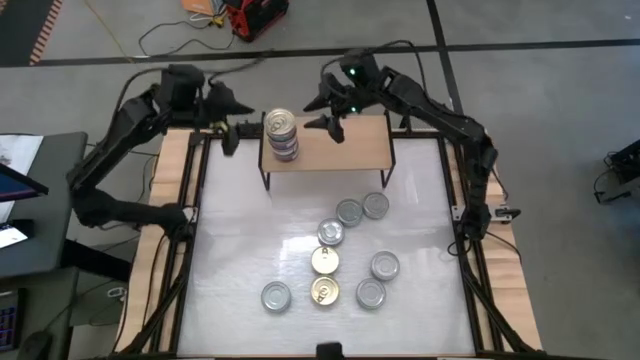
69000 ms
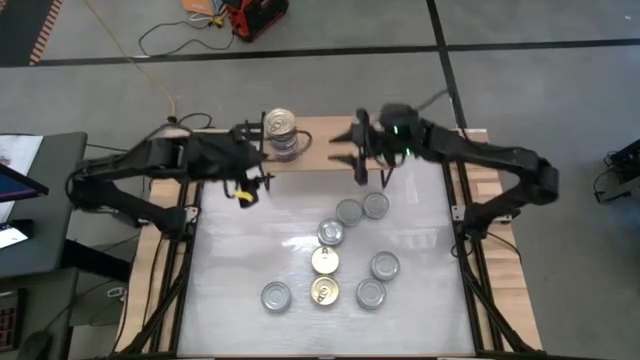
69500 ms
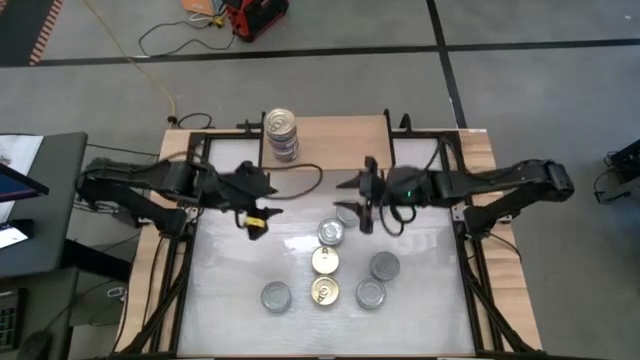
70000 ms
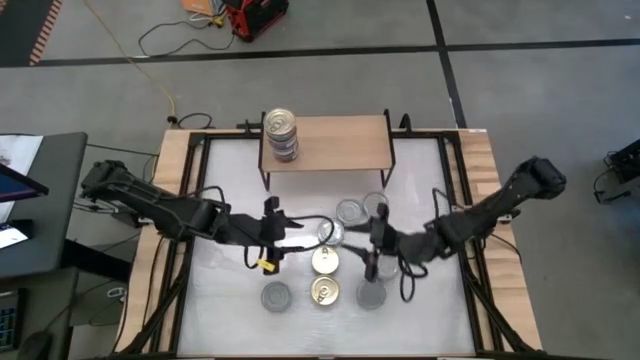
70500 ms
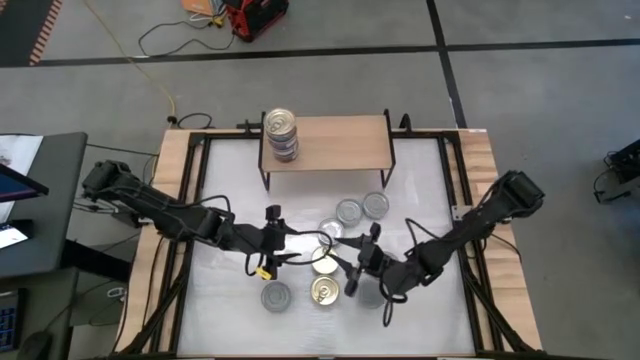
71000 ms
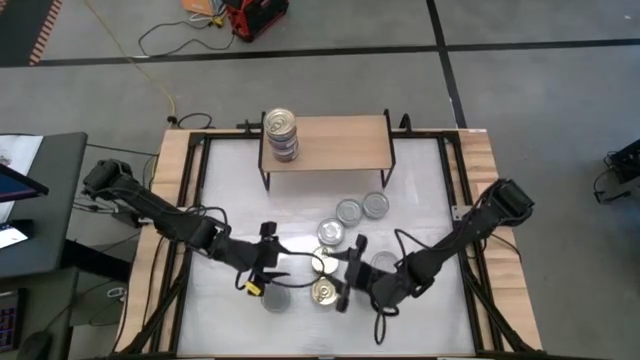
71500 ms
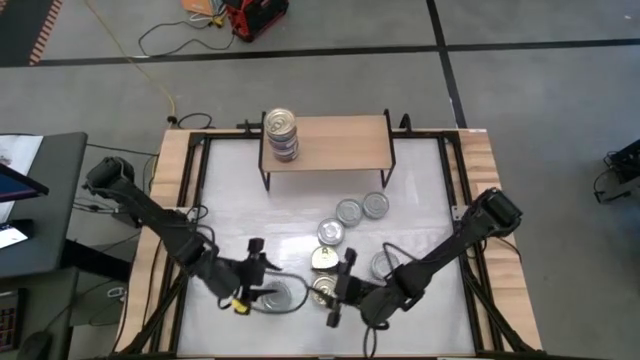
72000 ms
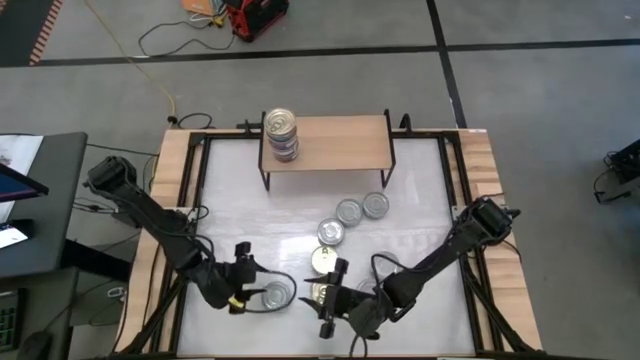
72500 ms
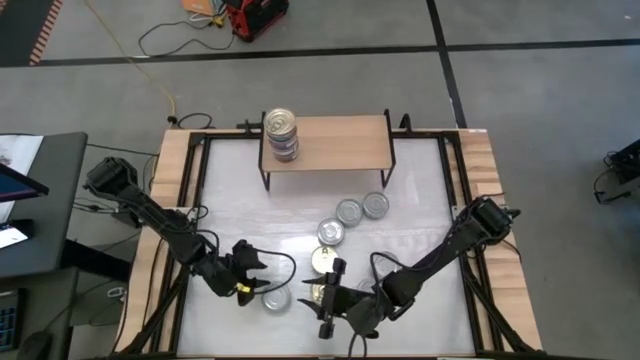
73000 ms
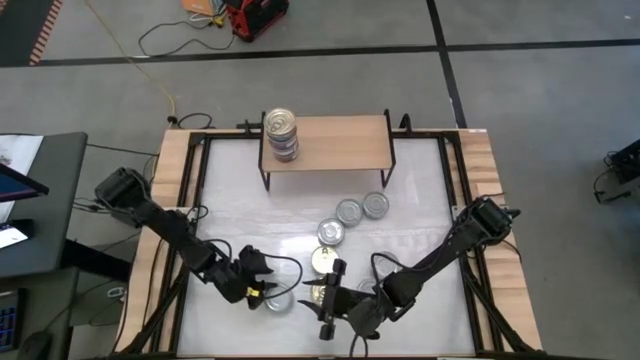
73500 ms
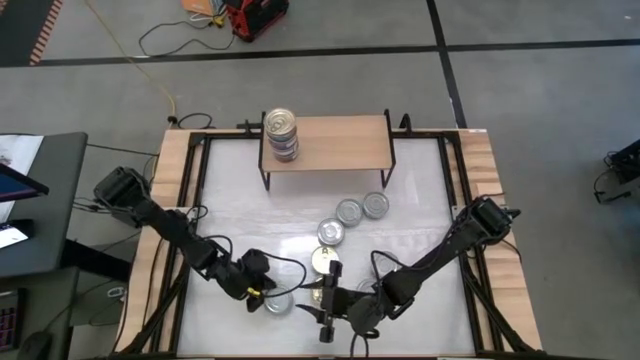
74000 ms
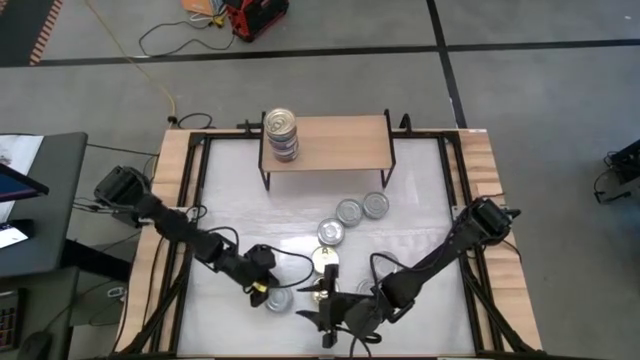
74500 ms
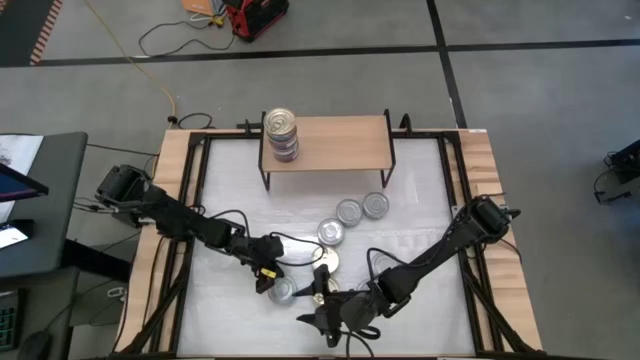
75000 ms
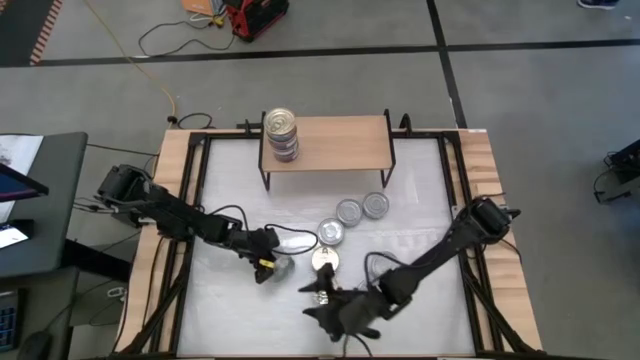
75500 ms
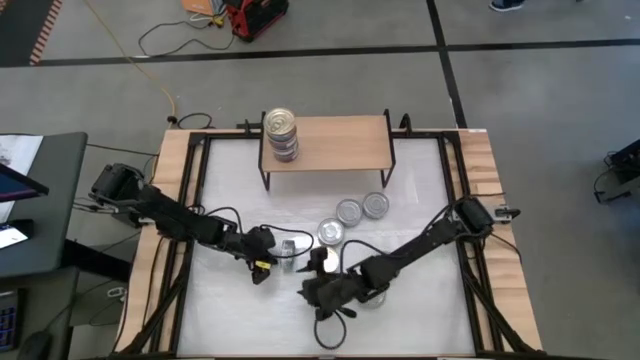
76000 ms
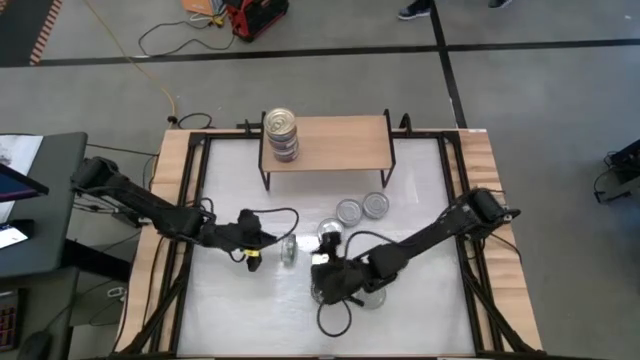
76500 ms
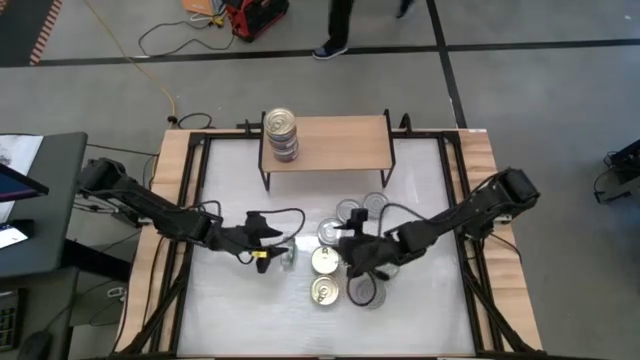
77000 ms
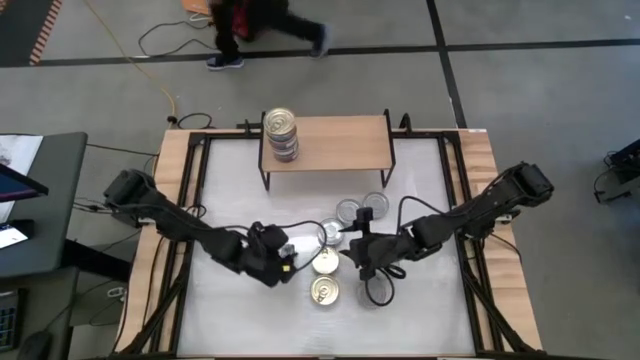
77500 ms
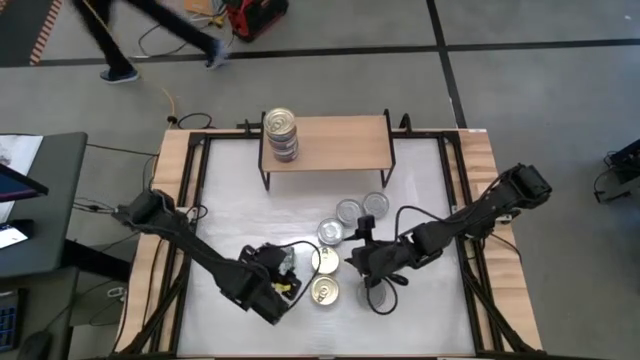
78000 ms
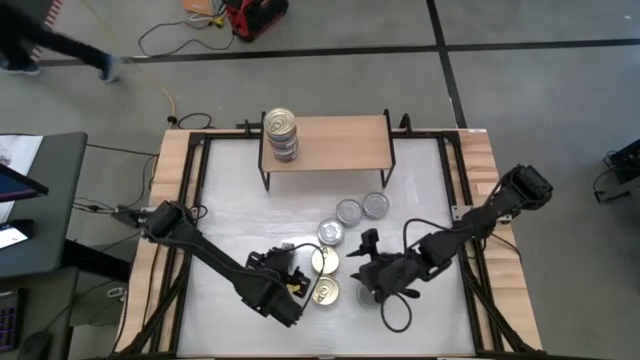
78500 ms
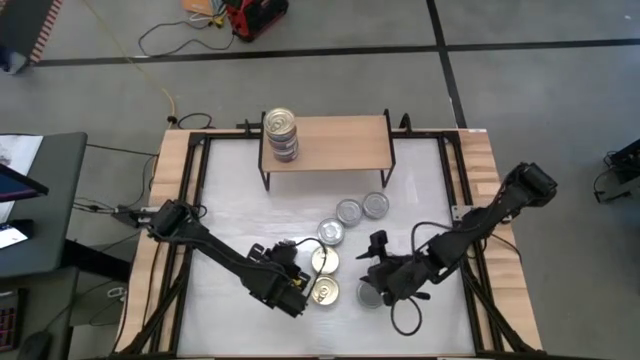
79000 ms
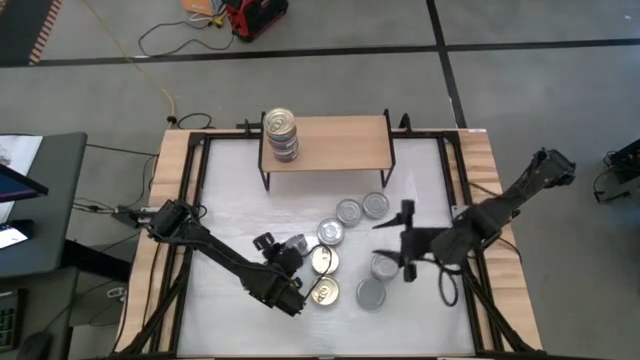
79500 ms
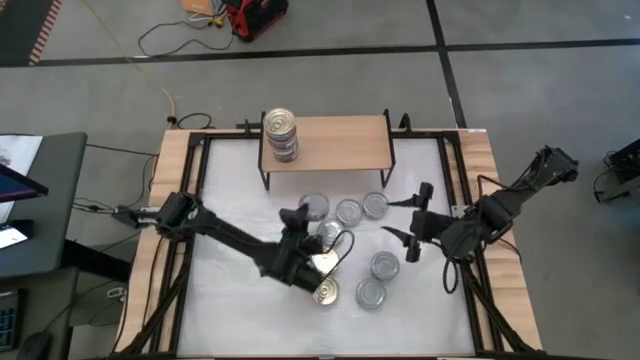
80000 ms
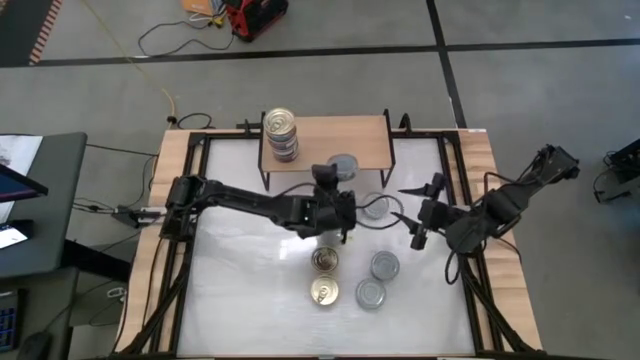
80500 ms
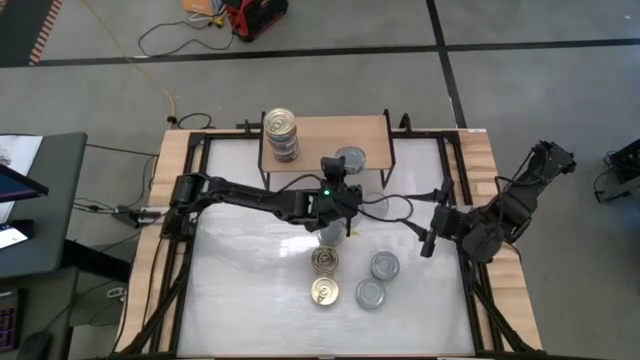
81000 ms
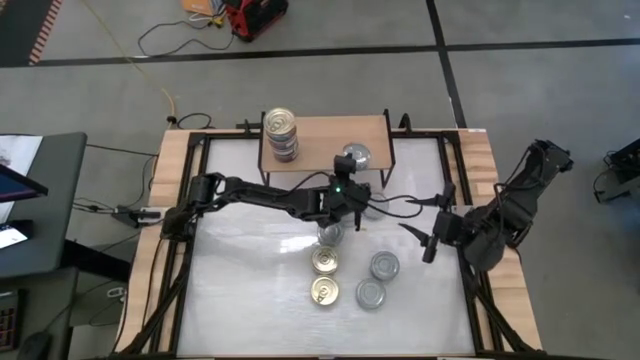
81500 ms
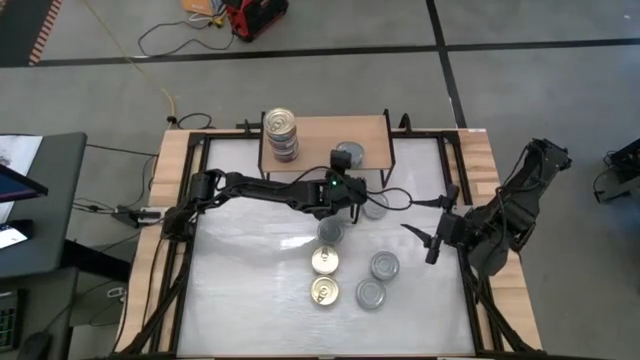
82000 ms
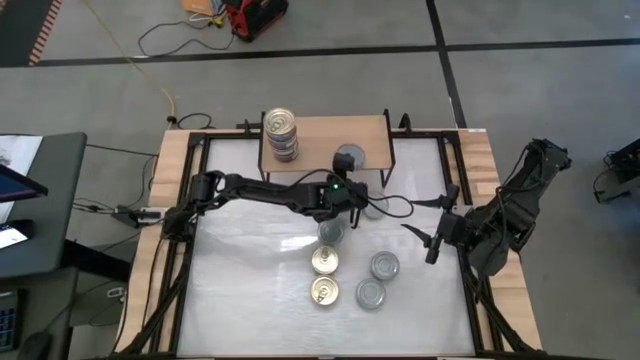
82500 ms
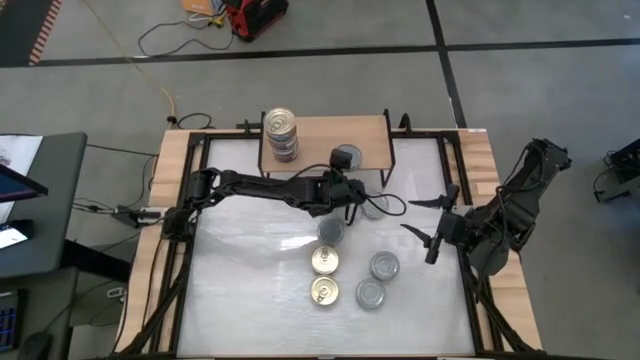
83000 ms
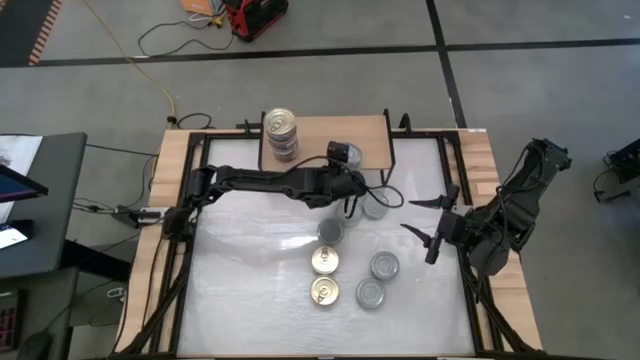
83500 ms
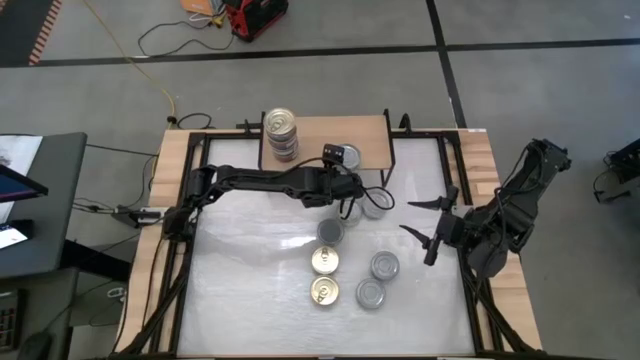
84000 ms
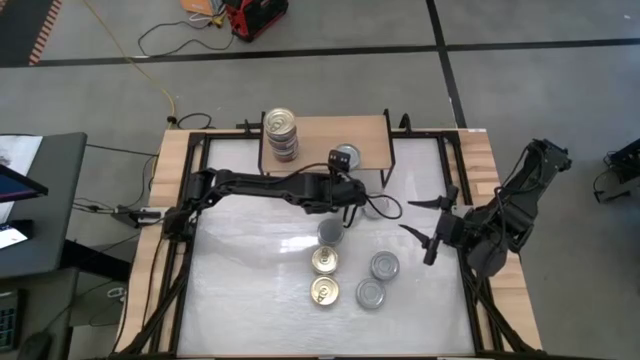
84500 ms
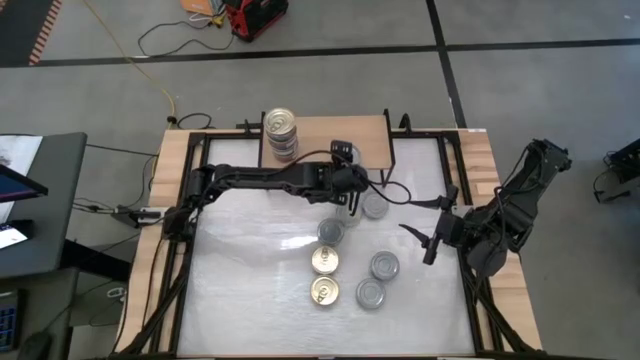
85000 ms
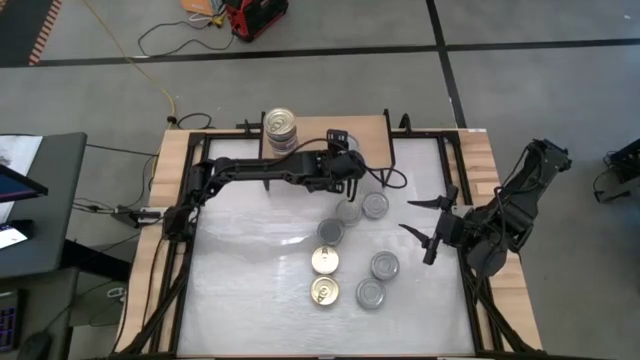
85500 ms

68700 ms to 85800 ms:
Task: Stack canned seafood by type on shelf
Put the green tuna can on the shelf

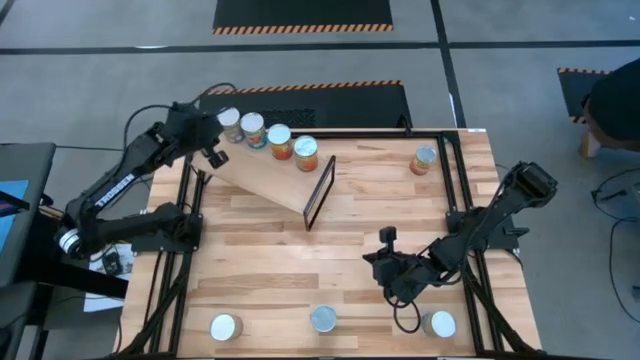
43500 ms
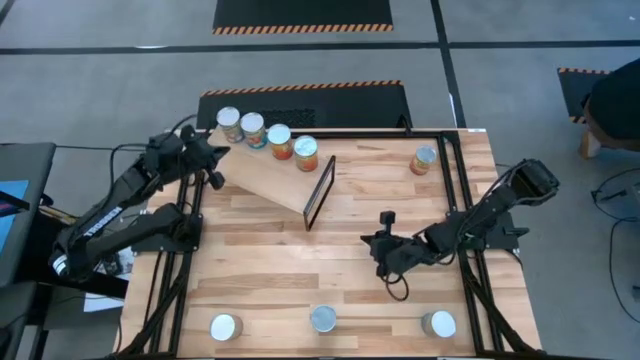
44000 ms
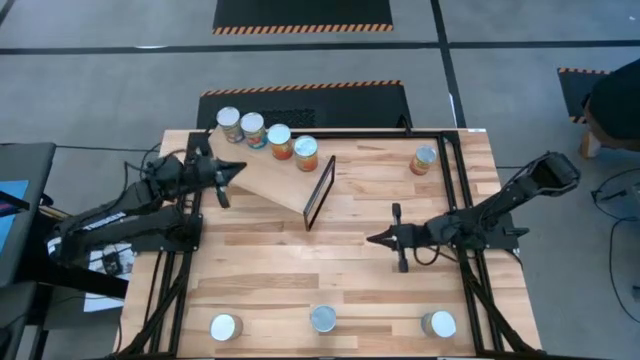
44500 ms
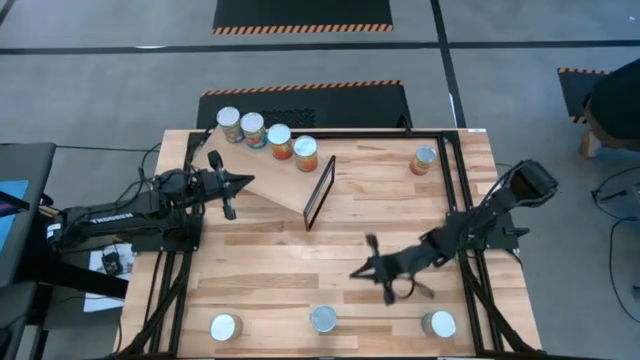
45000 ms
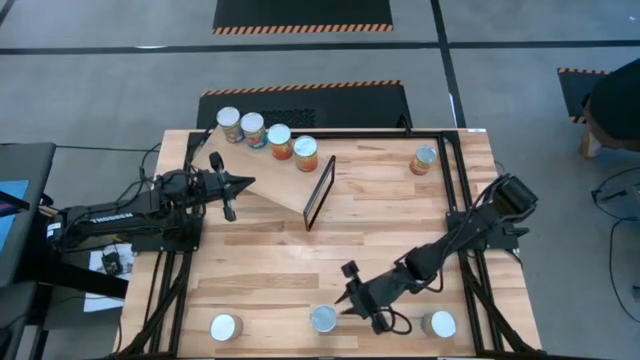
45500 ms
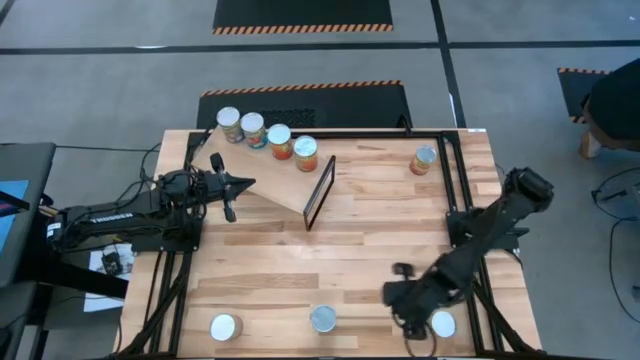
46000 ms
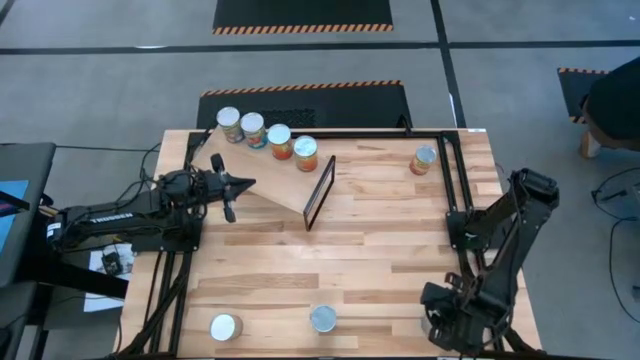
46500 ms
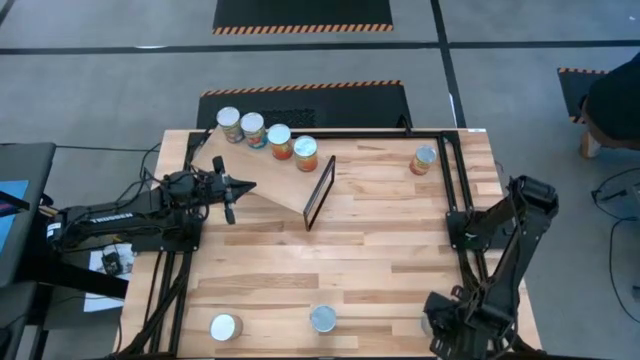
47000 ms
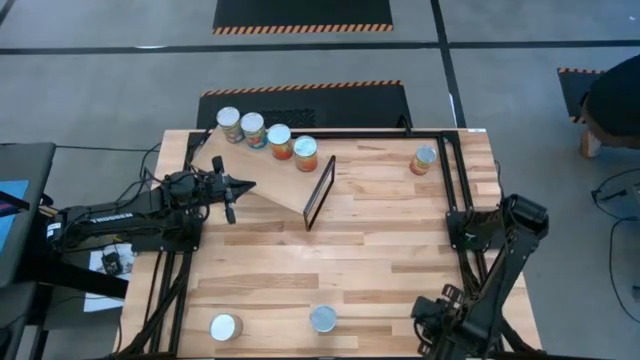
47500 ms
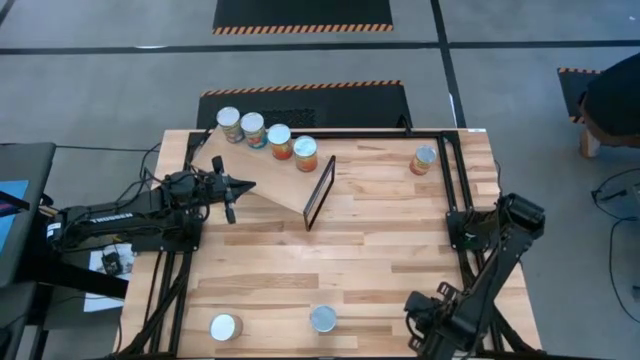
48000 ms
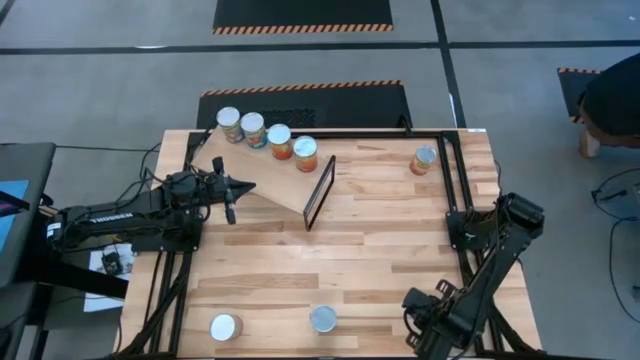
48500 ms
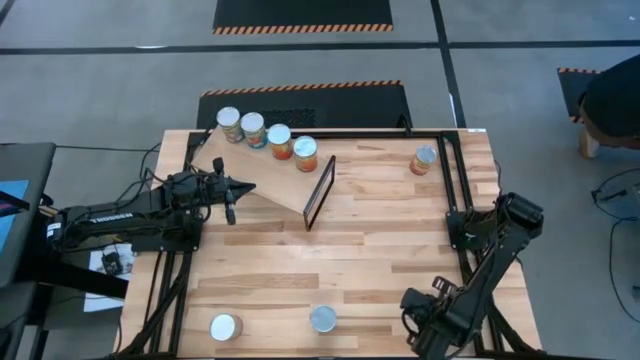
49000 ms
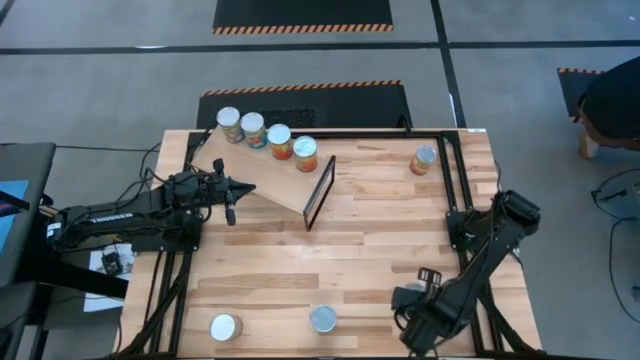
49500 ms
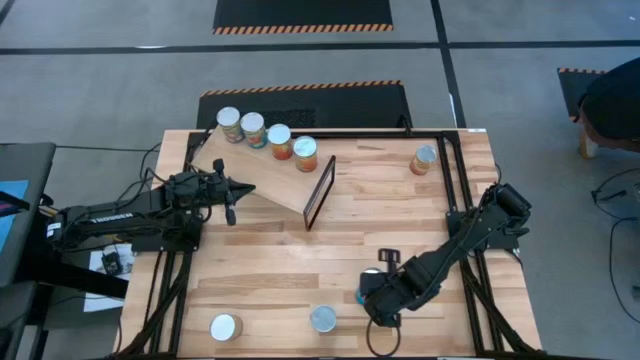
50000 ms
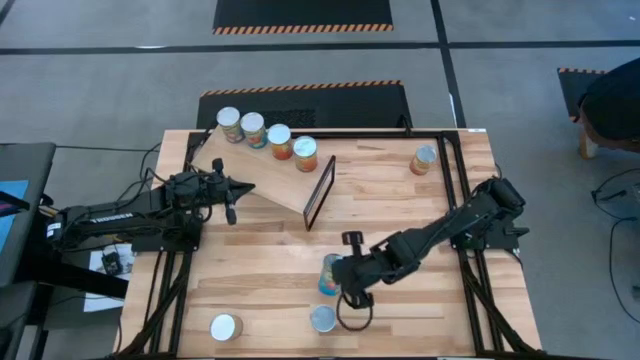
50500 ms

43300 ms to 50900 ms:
Task: Pick and place cans onto a shelf
Put the canned tomatoes on the shelf
